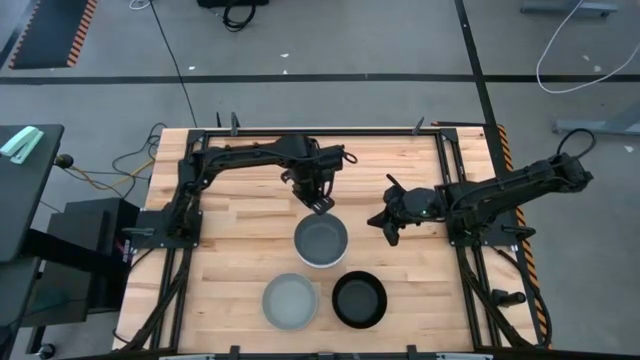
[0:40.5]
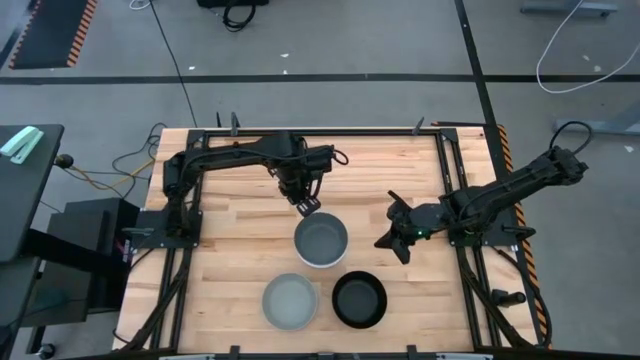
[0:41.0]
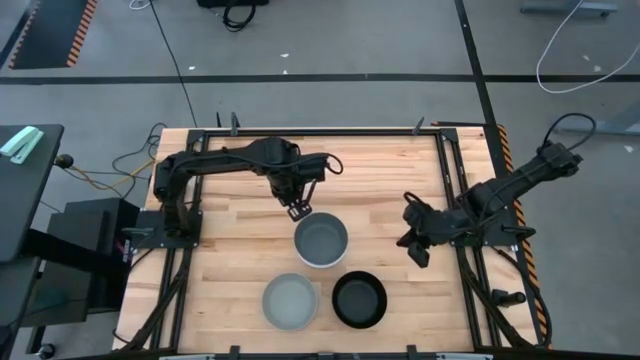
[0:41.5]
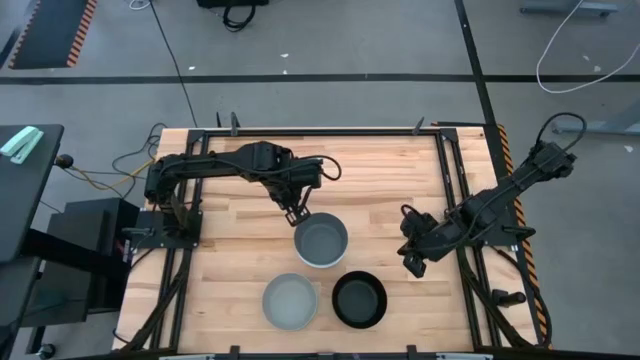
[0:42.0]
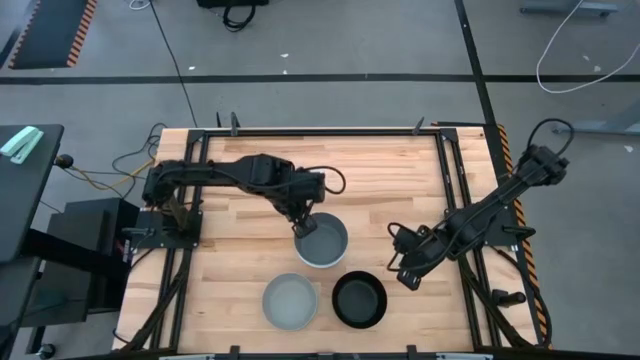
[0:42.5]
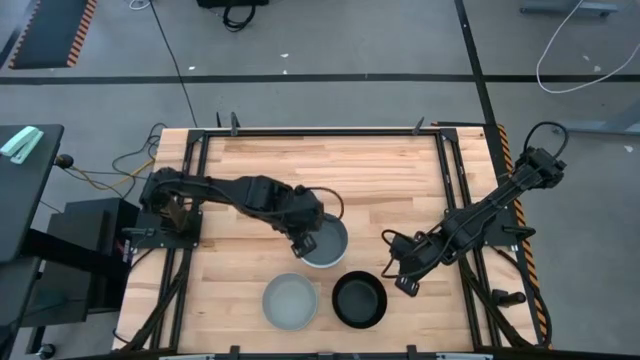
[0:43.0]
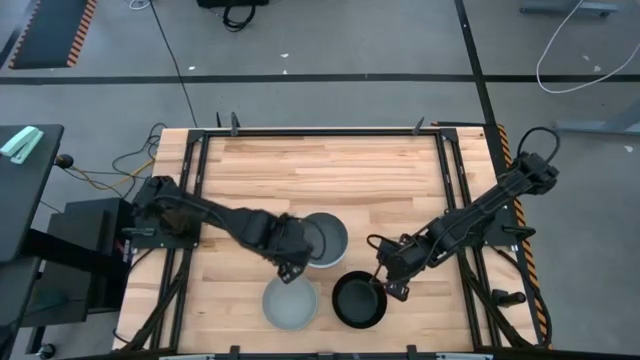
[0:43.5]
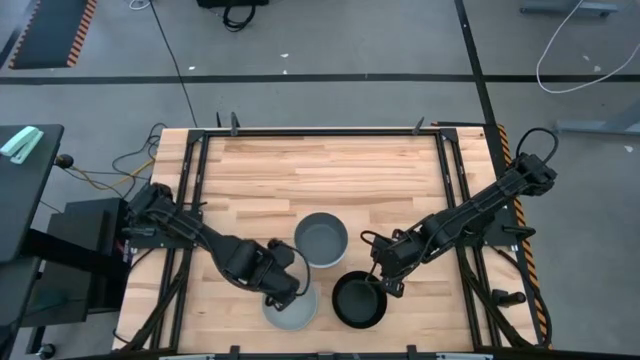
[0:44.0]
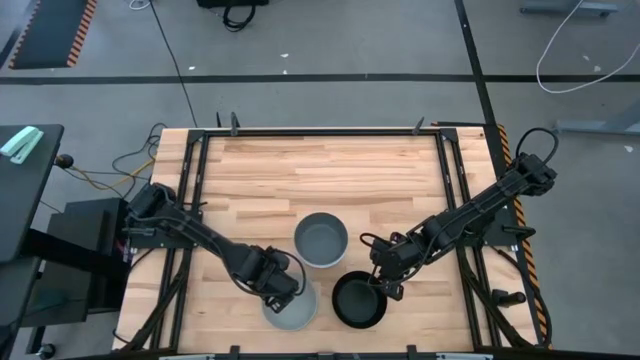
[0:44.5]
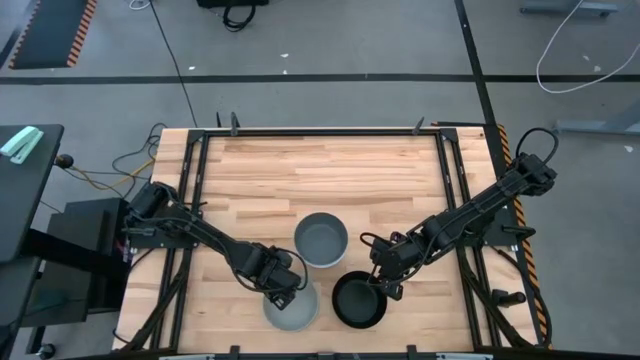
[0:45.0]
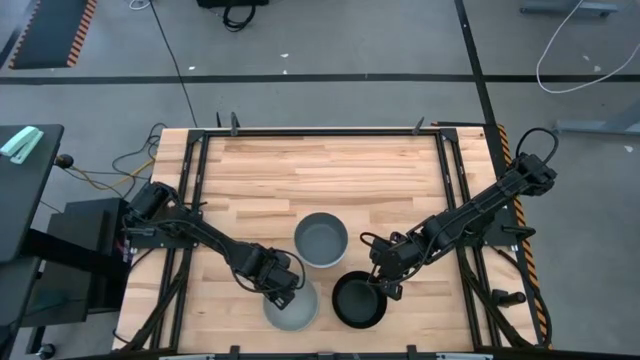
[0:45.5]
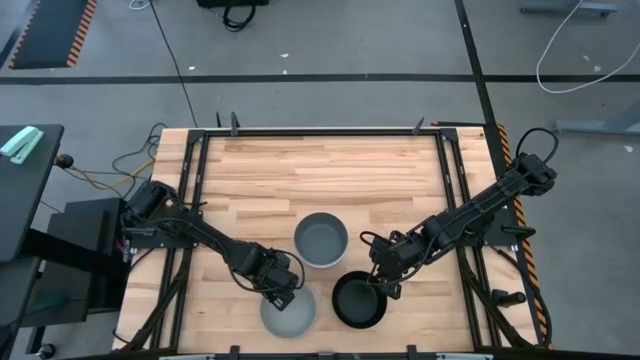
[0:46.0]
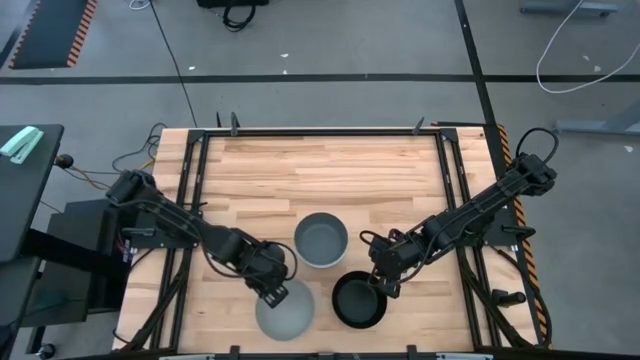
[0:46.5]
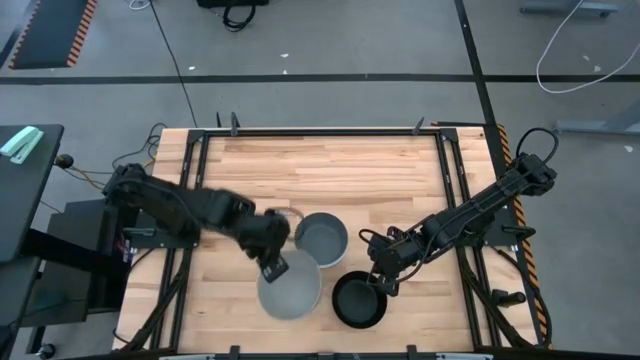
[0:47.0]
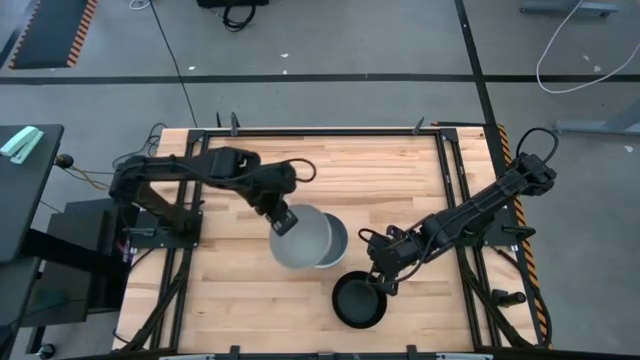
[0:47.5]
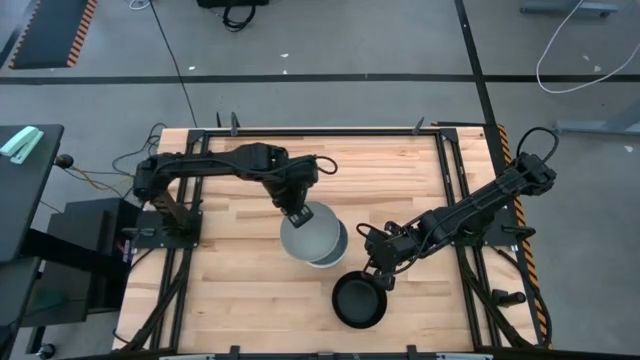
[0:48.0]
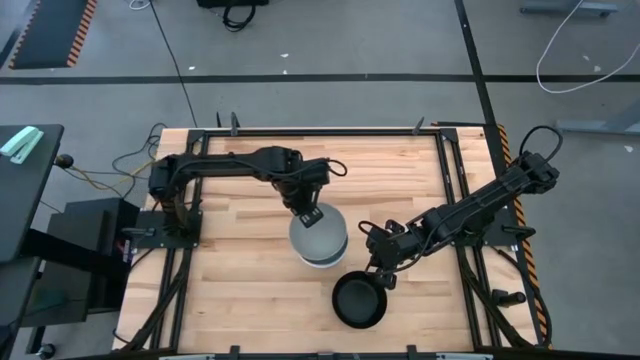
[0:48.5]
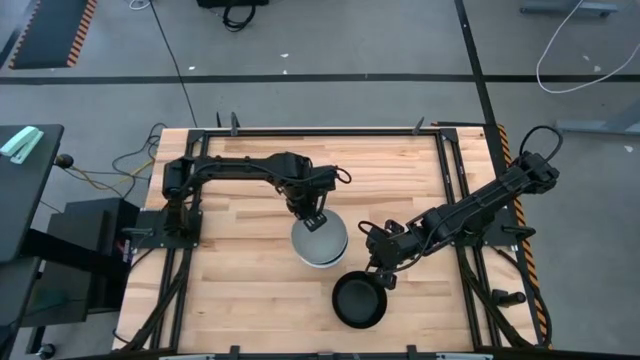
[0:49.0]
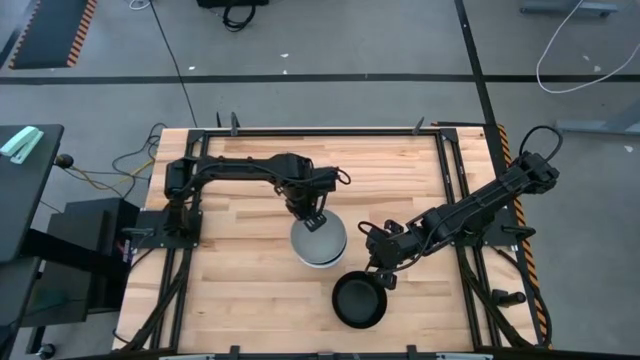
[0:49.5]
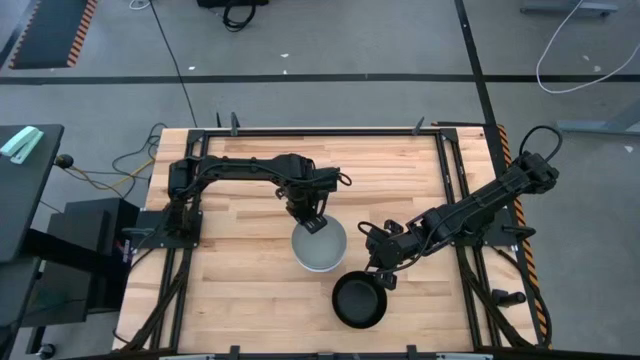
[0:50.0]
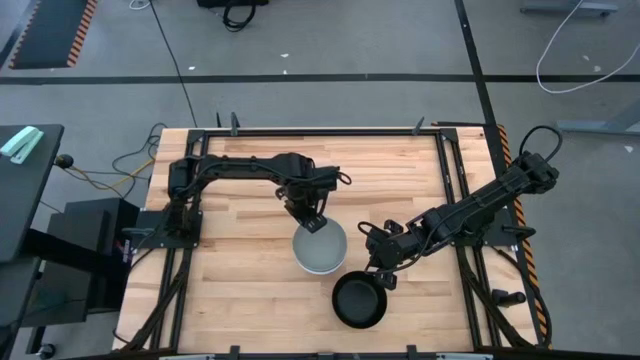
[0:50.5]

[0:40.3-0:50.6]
Task: Nest bowls inside each other
Stack the gray bowl on the dark gray bowl

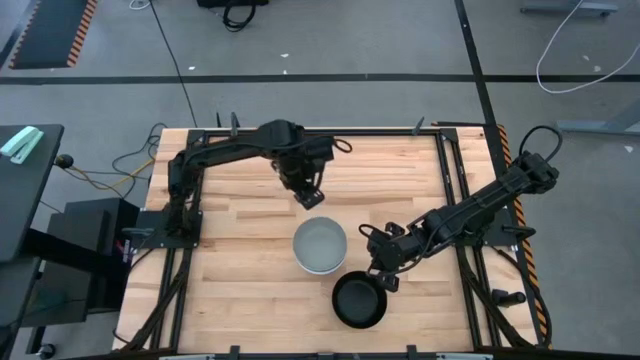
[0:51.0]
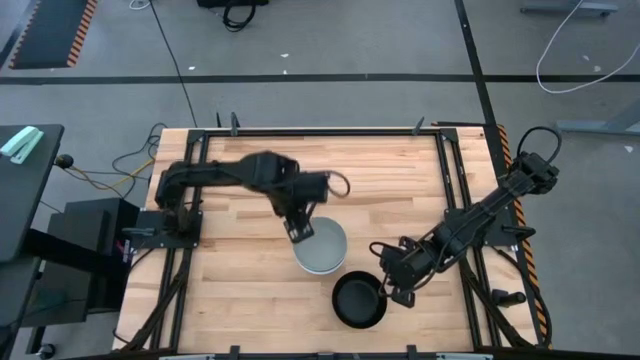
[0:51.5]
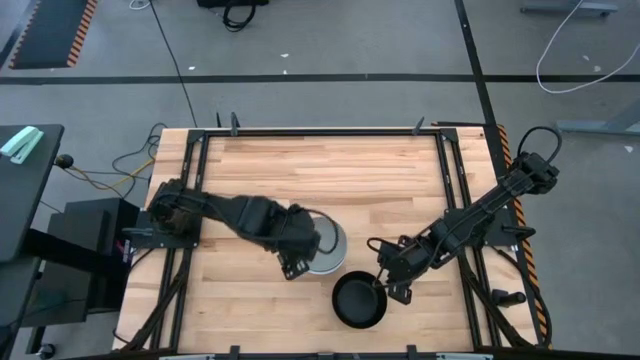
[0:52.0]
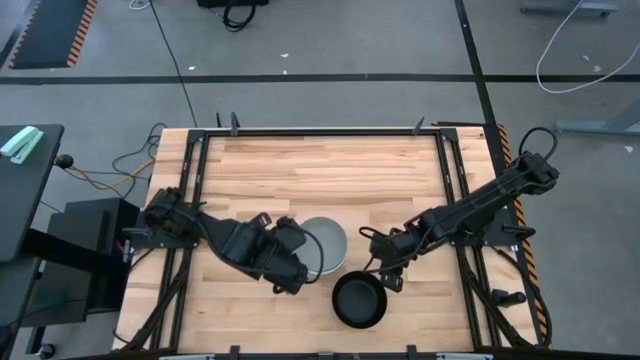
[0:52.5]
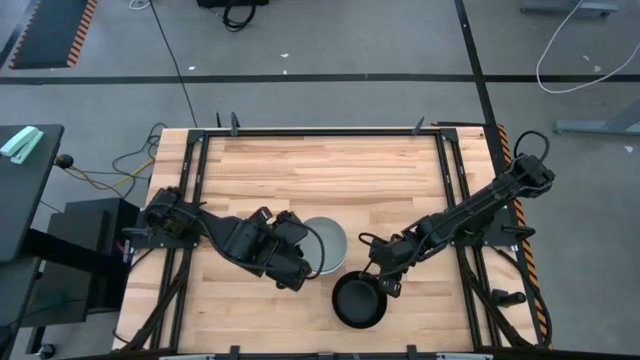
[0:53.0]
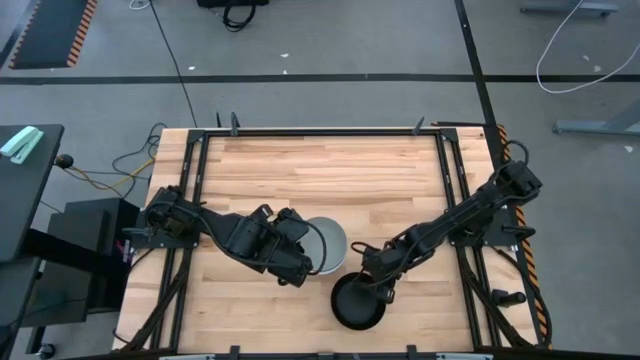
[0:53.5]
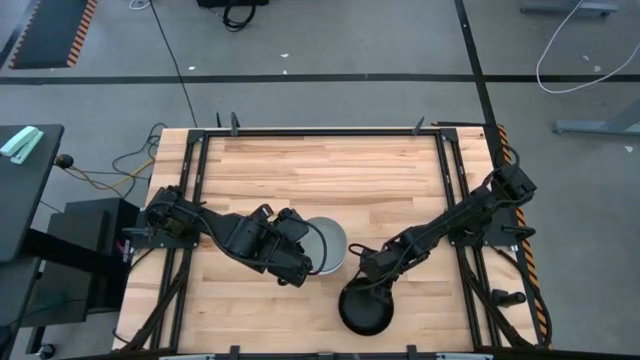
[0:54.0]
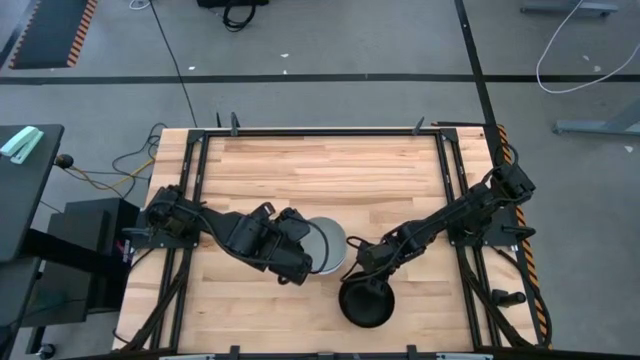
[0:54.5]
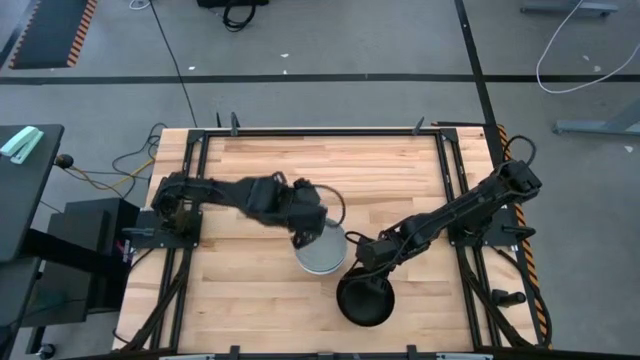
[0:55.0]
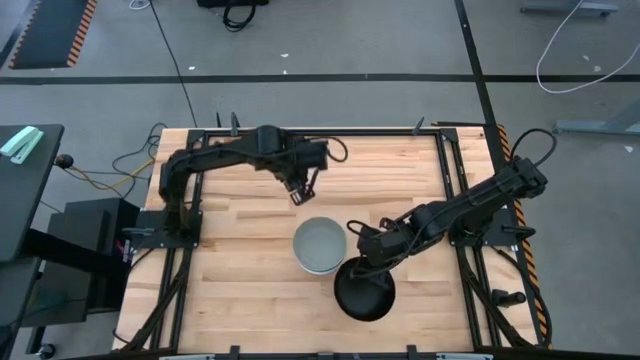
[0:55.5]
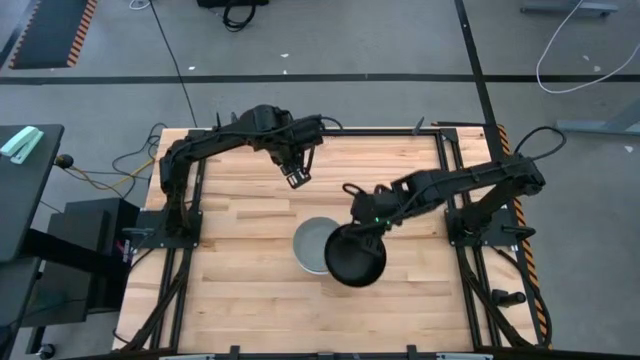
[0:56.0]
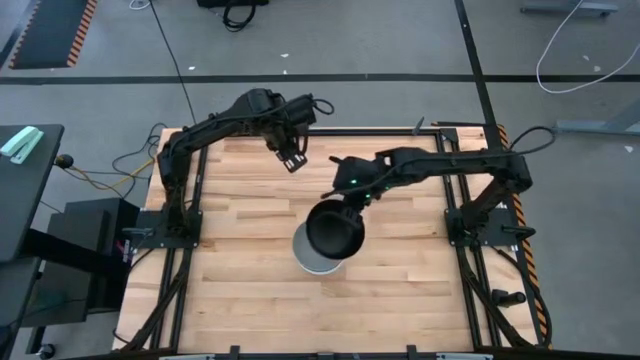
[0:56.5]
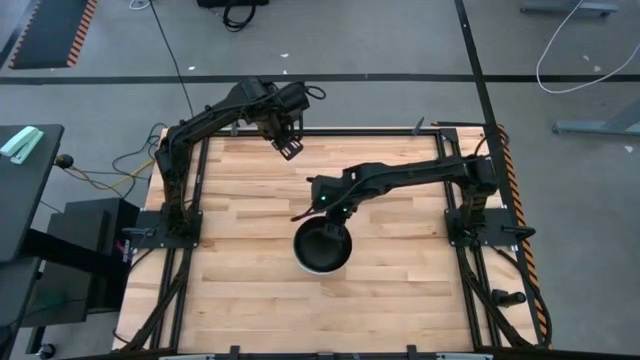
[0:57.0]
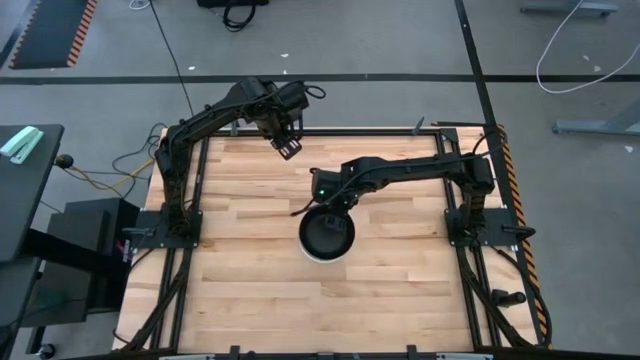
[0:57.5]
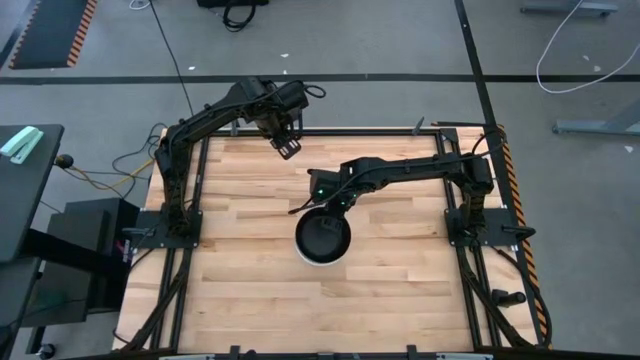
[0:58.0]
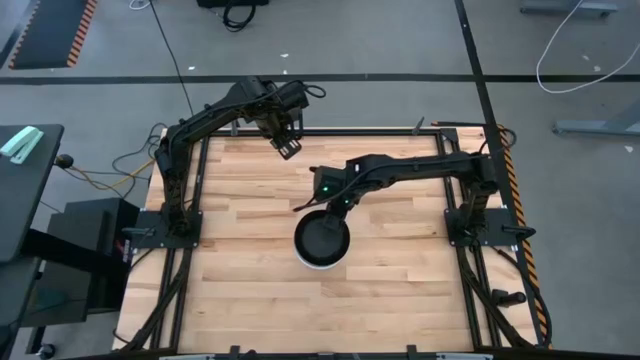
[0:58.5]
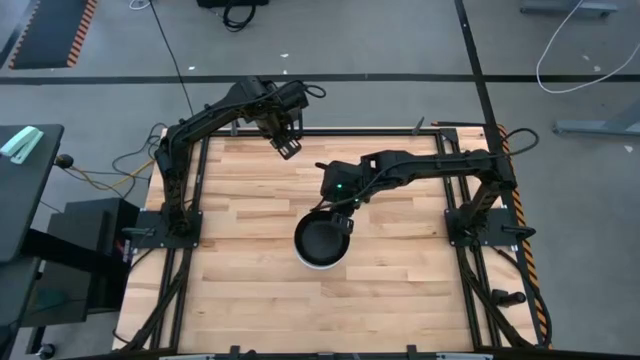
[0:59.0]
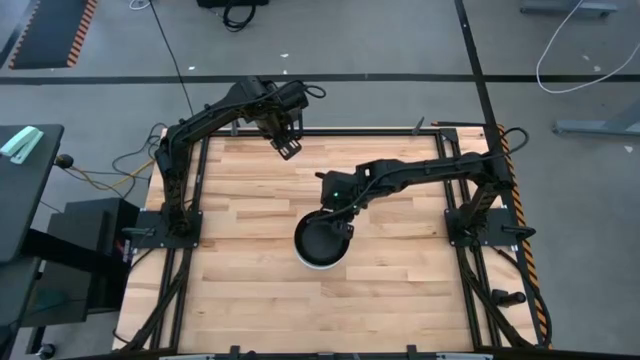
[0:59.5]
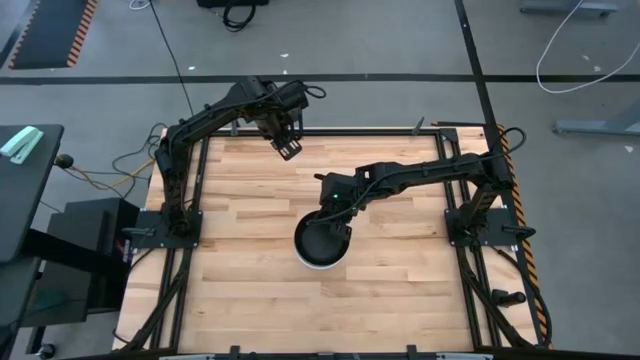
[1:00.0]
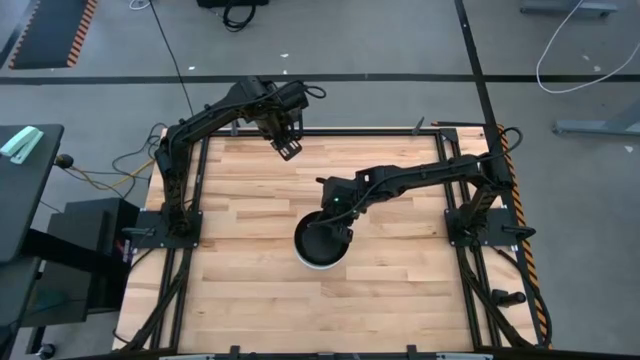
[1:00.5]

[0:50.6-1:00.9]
Stack the black bowl on the gray bowl
